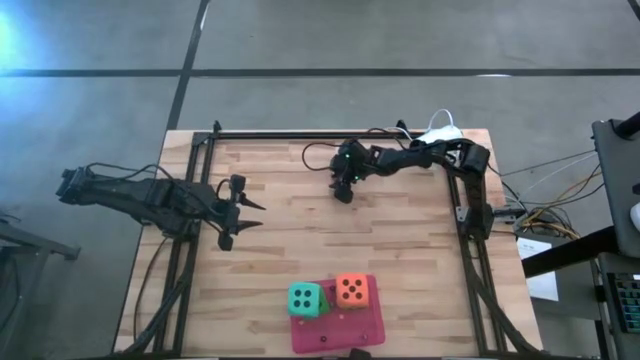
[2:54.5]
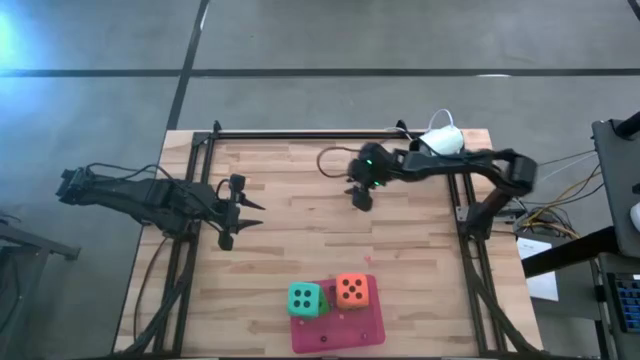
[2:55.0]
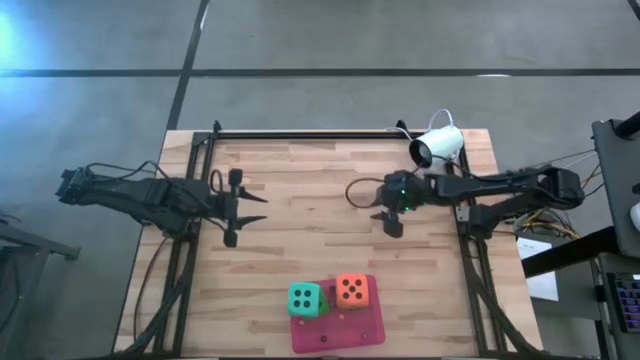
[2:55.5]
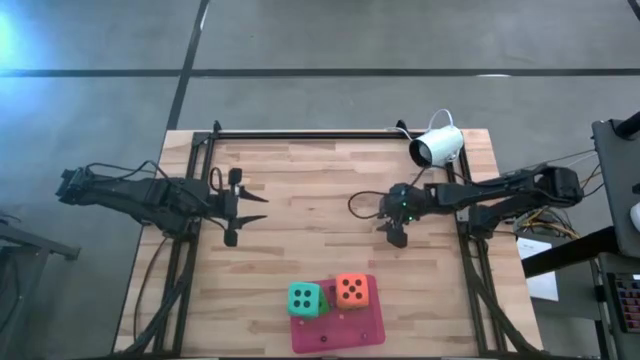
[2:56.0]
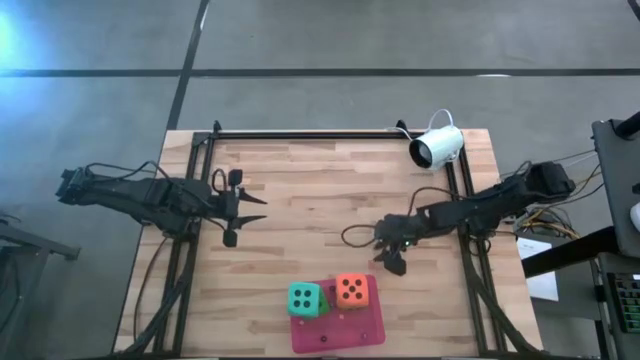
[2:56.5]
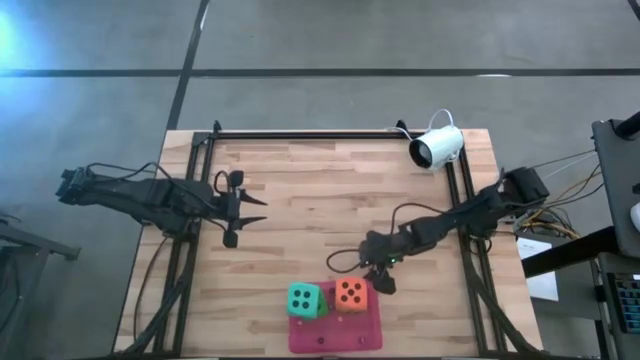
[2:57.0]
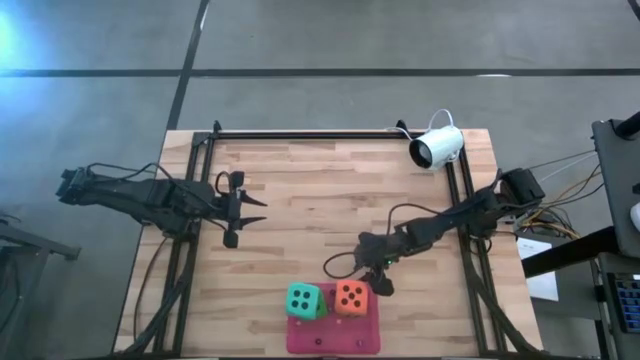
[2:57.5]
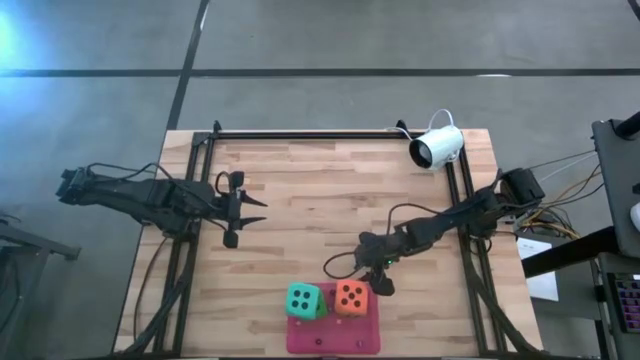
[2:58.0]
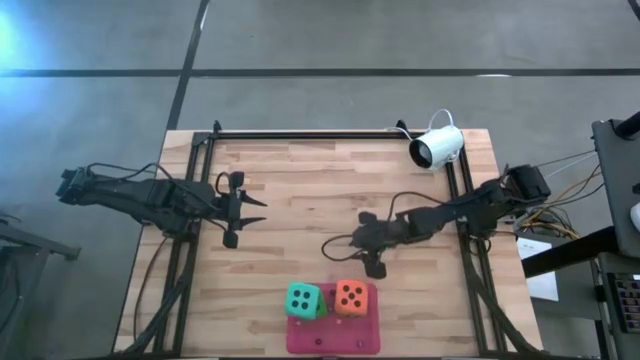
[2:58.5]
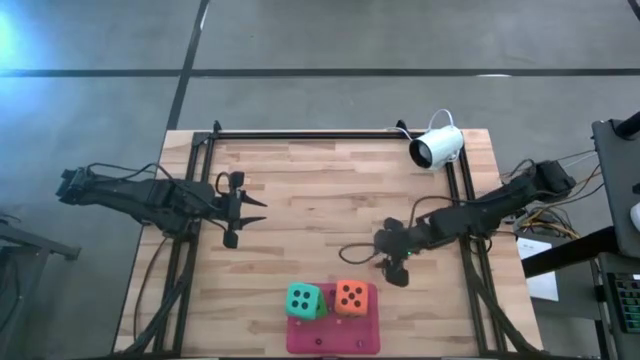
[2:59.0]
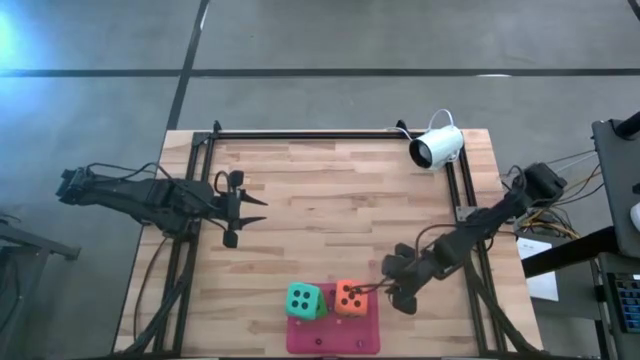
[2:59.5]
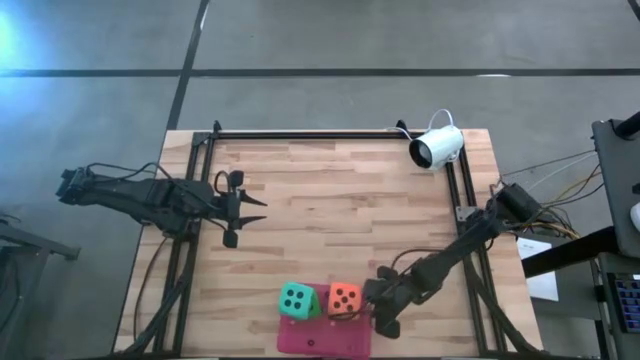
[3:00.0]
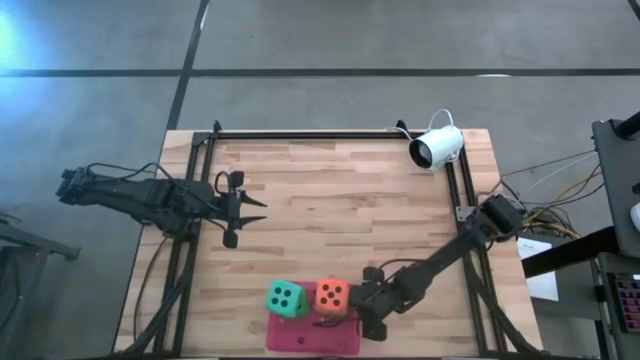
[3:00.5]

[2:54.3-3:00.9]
Task: Pick & Place Dice
Adjust the pink bin

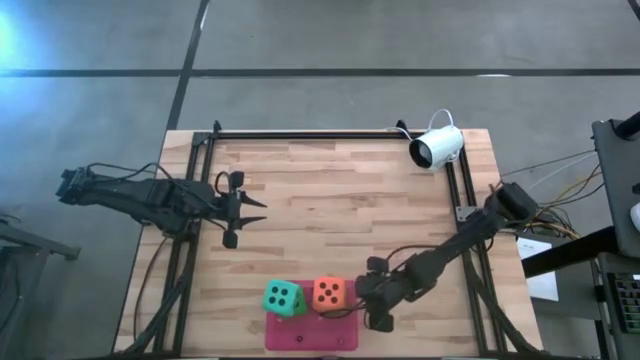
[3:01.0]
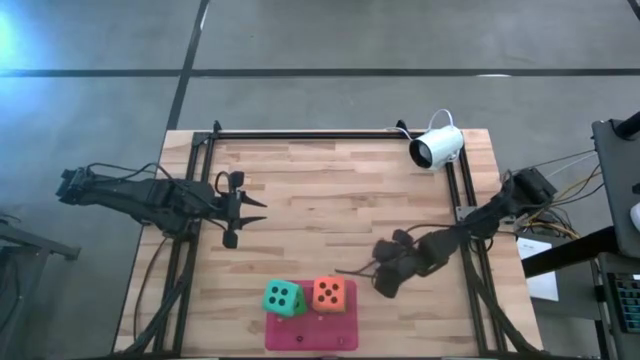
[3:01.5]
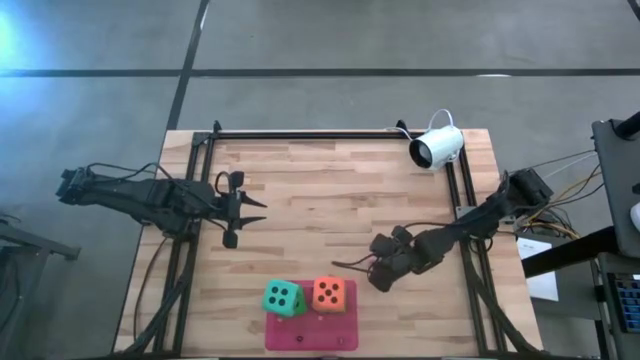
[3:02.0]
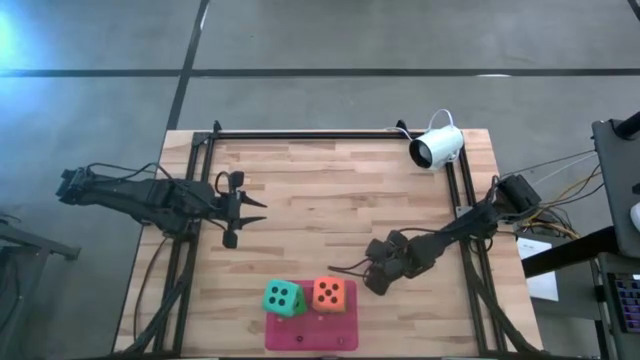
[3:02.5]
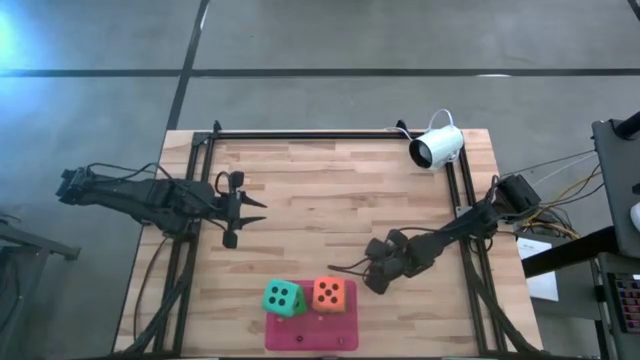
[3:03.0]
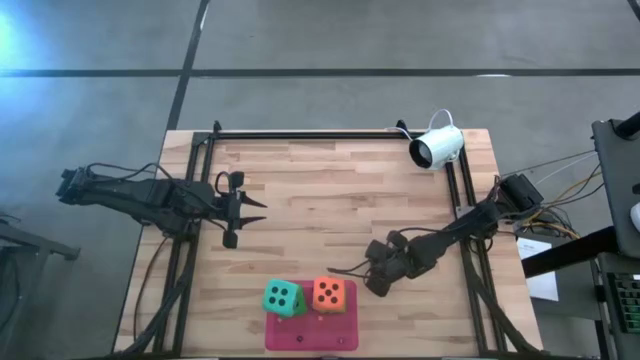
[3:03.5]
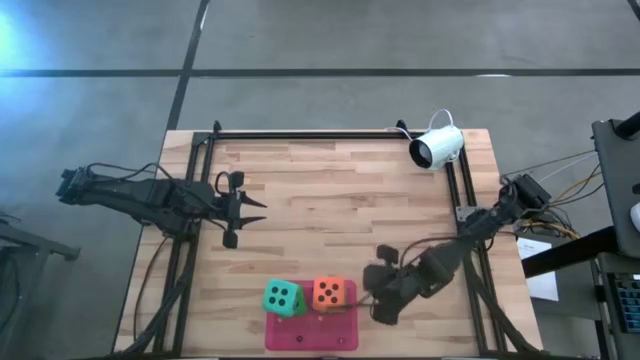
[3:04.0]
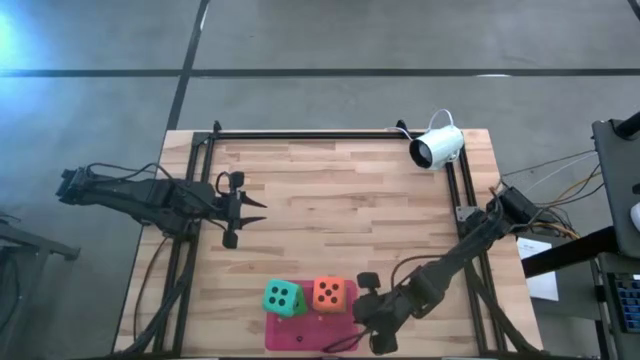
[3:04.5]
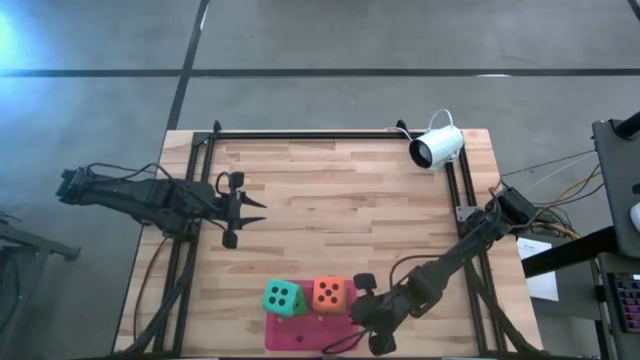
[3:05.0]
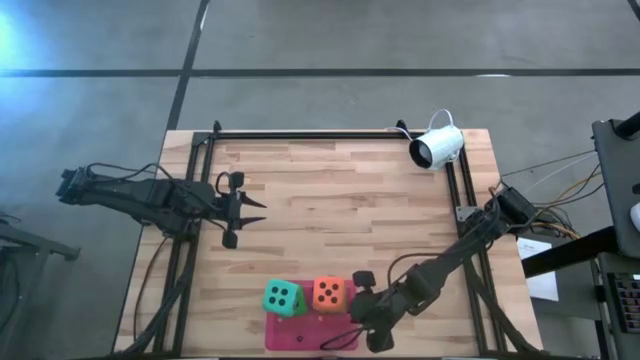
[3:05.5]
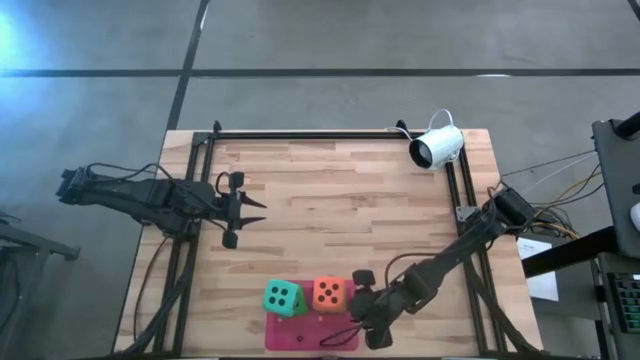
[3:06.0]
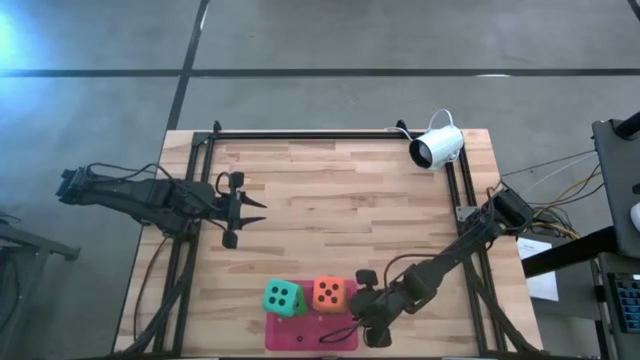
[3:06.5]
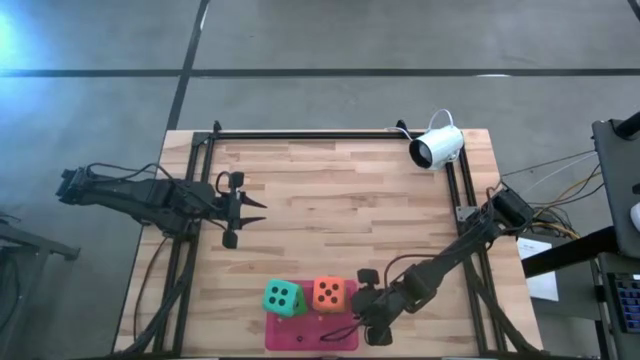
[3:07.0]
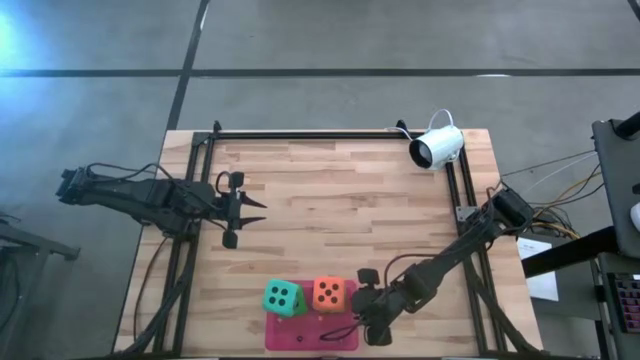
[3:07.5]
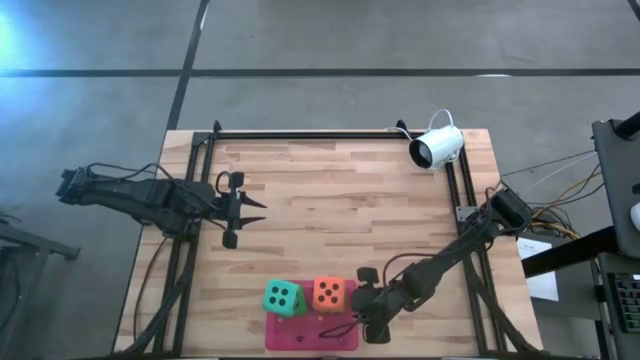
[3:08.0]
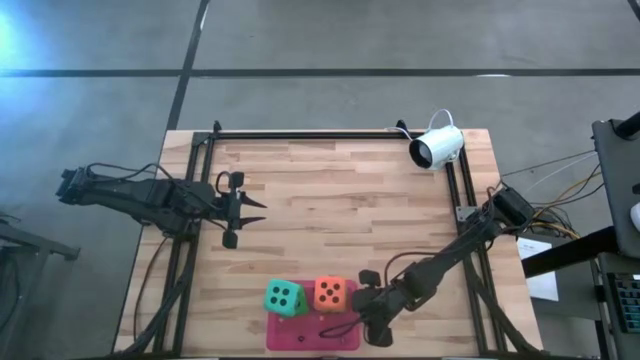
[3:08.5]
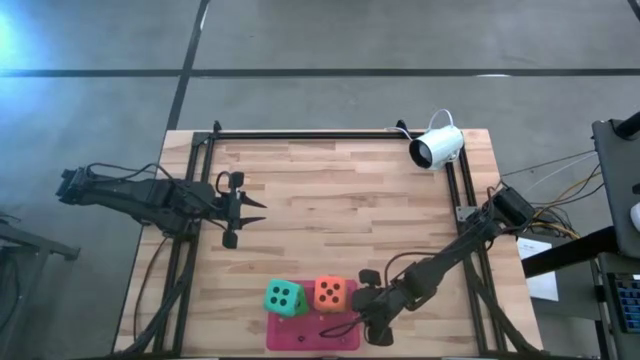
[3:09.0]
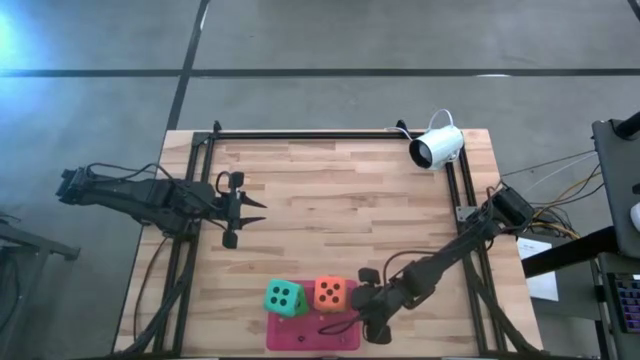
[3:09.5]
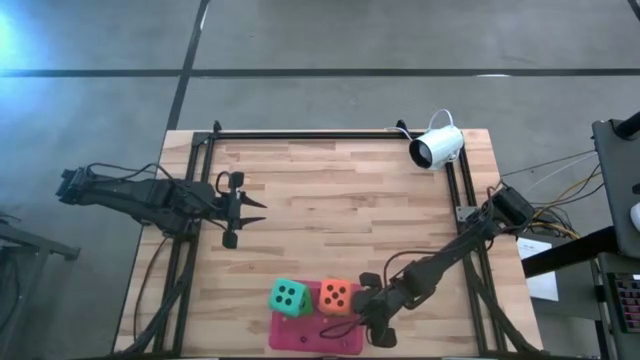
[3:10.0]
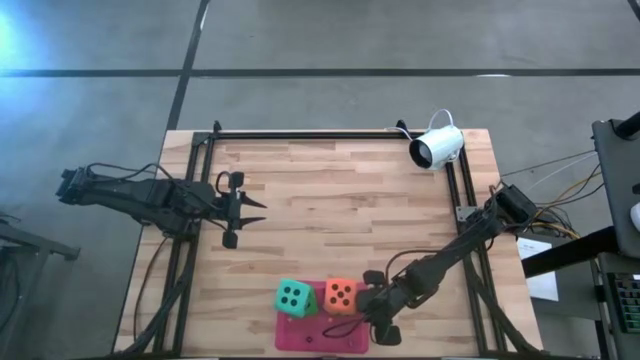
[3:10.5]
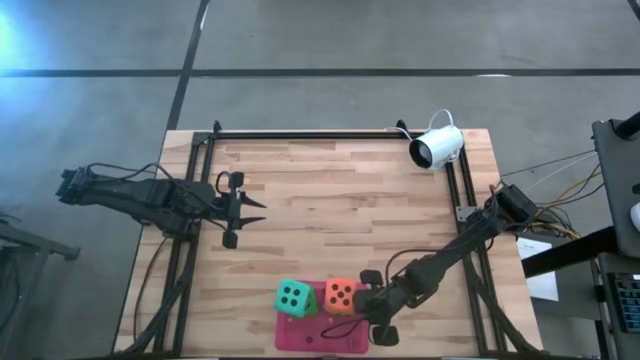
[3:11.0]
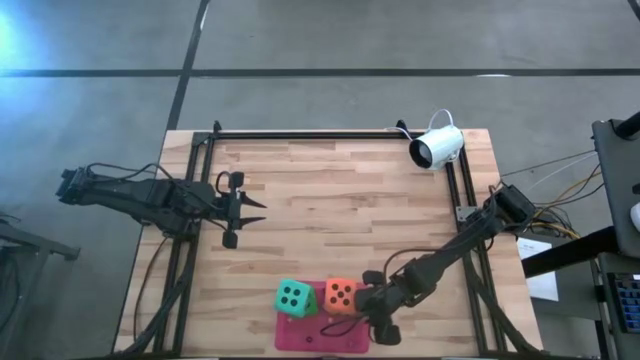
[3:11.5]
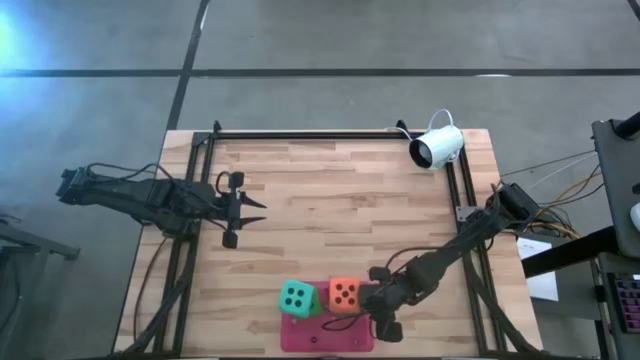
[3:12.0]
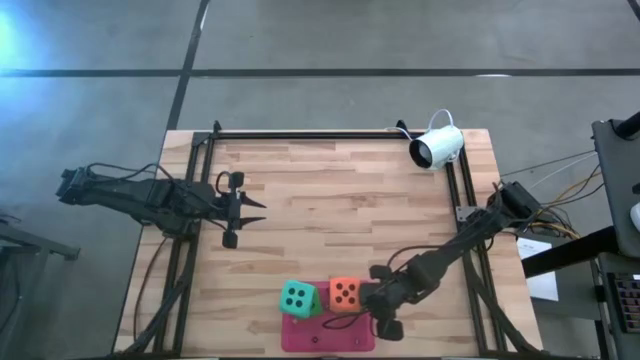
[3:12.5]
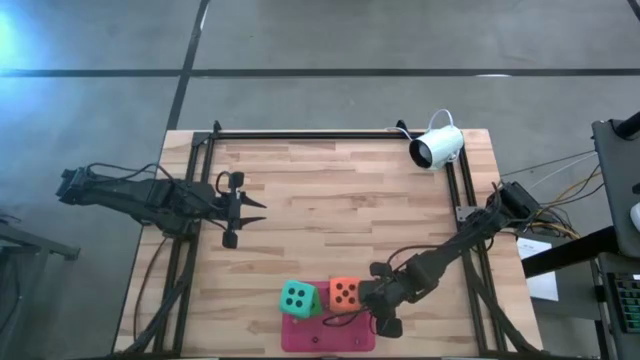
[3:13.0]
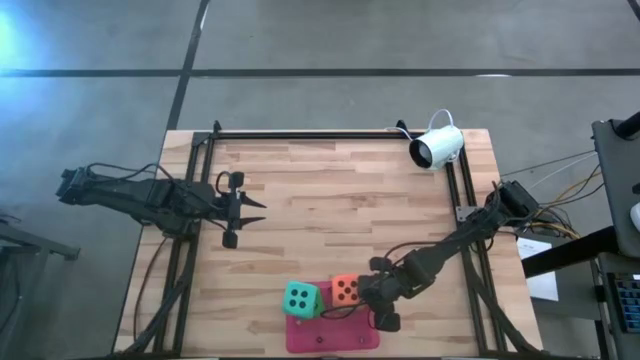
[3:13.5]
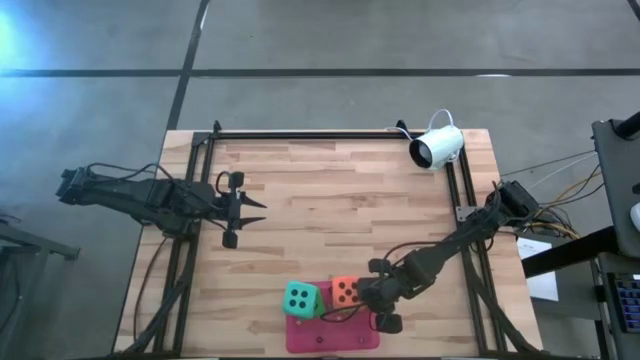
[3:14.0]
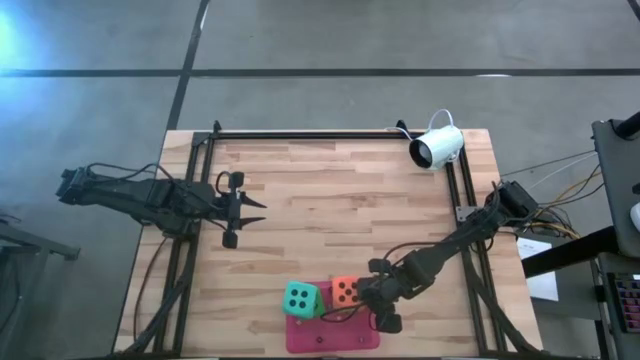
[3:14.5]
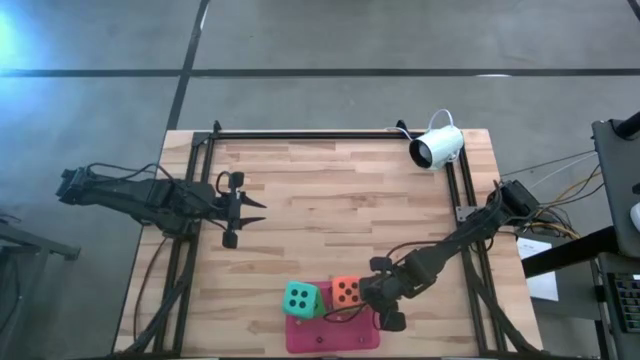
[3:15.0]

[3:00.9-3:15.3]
Put the pink dice into the pink bin
